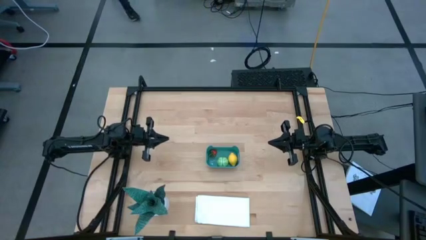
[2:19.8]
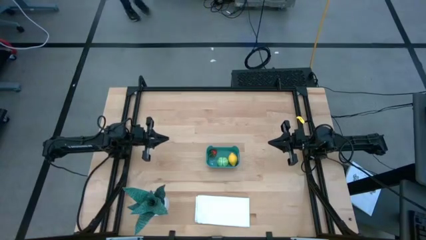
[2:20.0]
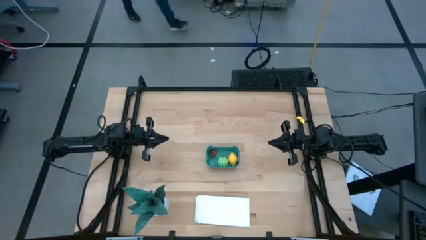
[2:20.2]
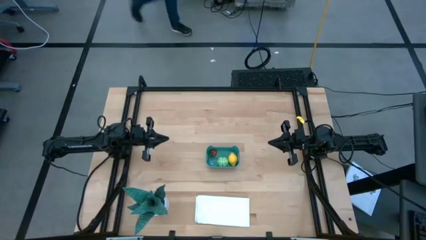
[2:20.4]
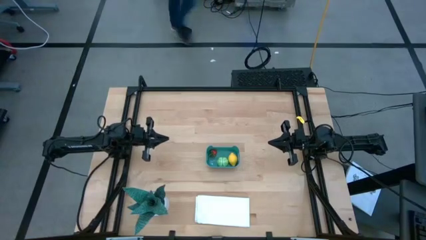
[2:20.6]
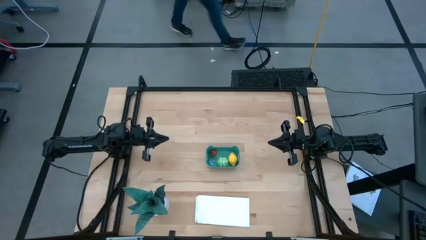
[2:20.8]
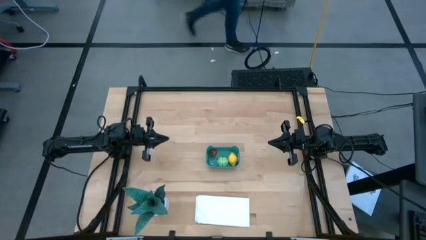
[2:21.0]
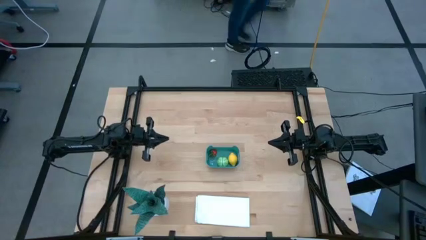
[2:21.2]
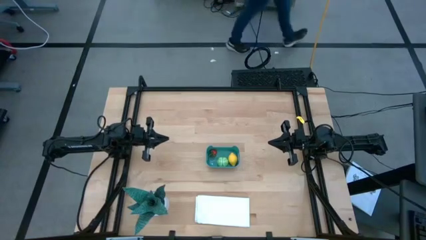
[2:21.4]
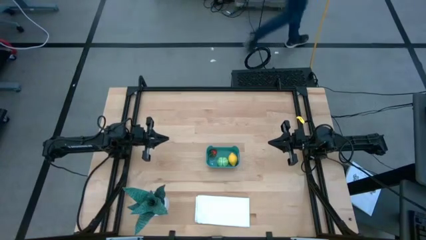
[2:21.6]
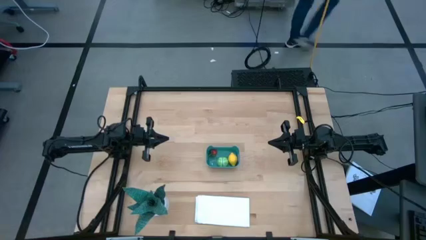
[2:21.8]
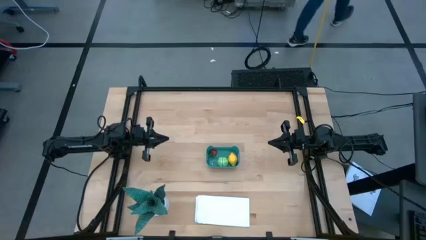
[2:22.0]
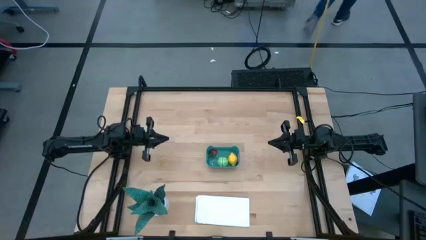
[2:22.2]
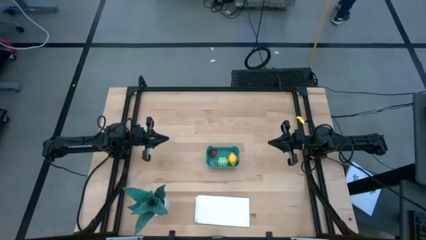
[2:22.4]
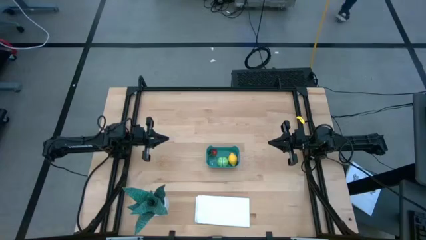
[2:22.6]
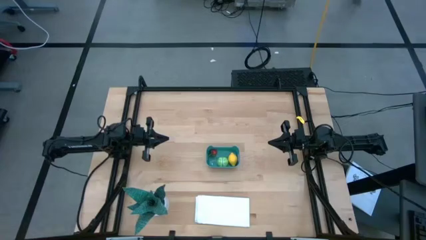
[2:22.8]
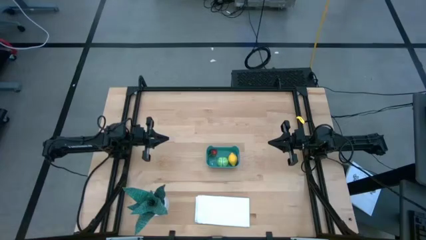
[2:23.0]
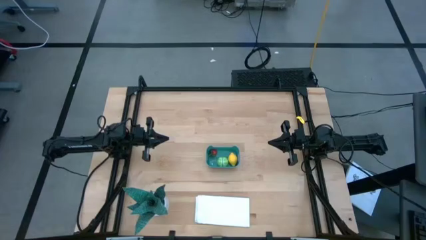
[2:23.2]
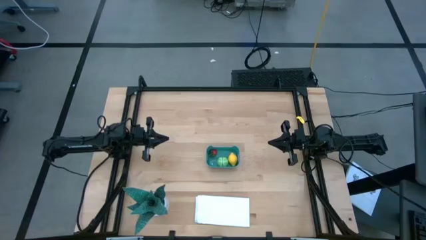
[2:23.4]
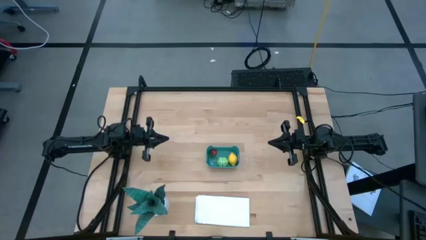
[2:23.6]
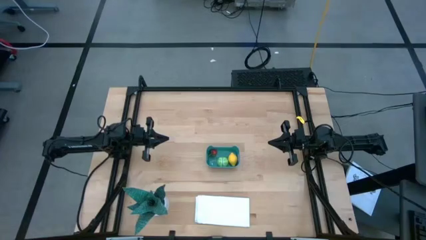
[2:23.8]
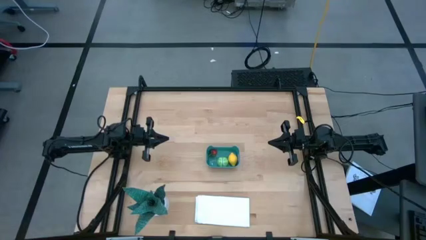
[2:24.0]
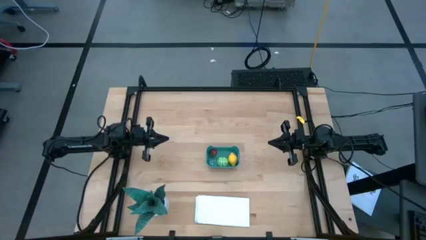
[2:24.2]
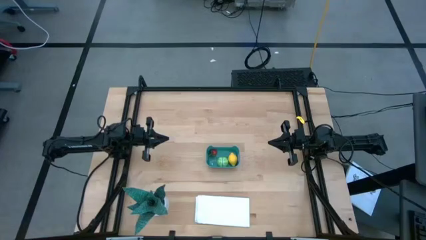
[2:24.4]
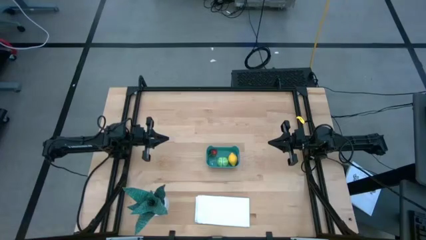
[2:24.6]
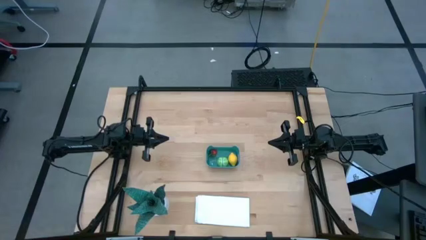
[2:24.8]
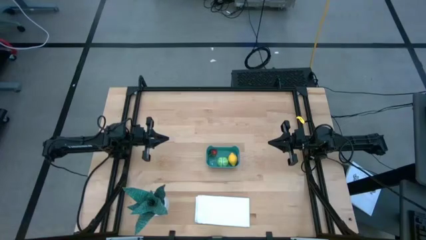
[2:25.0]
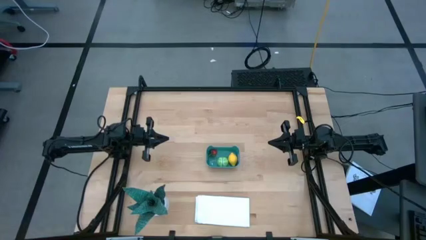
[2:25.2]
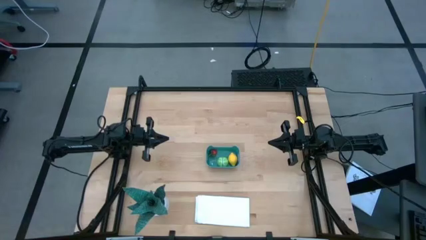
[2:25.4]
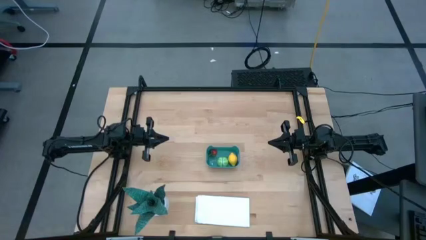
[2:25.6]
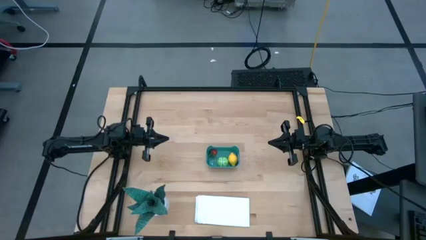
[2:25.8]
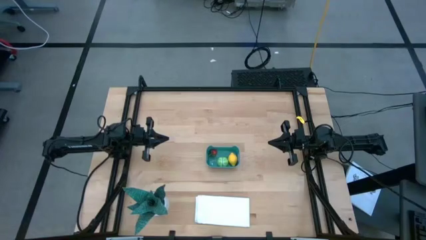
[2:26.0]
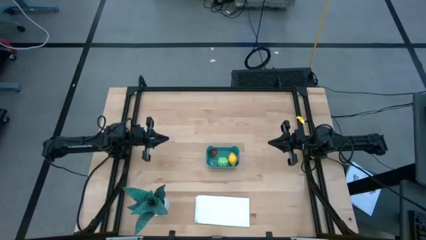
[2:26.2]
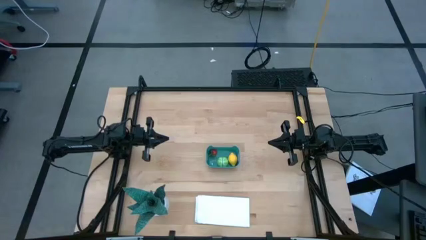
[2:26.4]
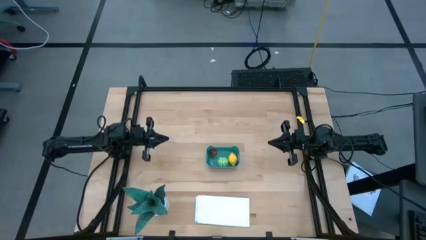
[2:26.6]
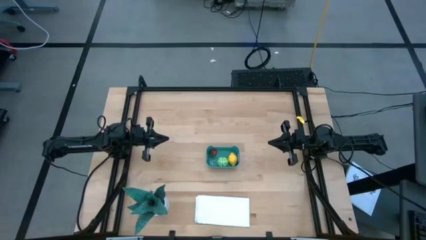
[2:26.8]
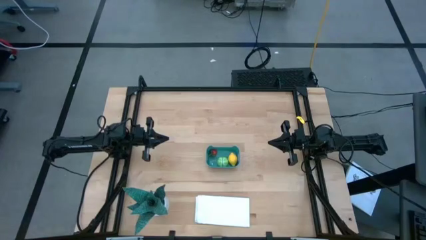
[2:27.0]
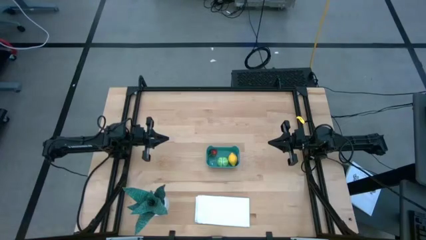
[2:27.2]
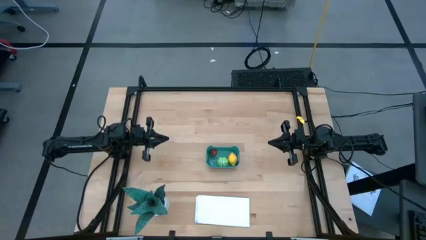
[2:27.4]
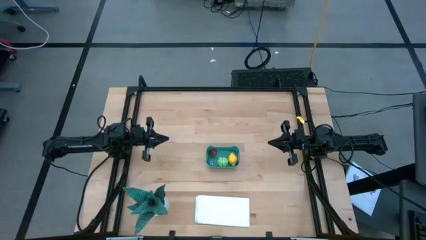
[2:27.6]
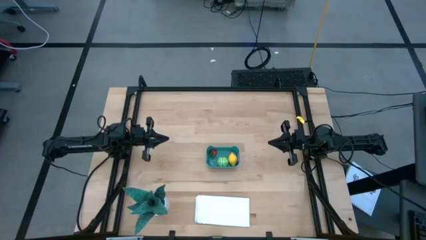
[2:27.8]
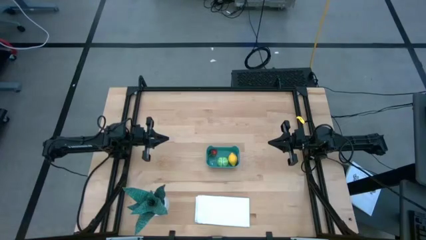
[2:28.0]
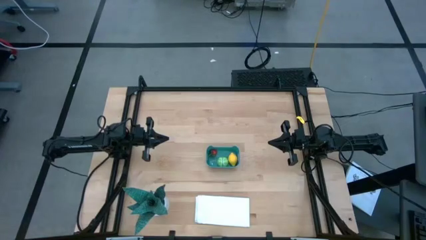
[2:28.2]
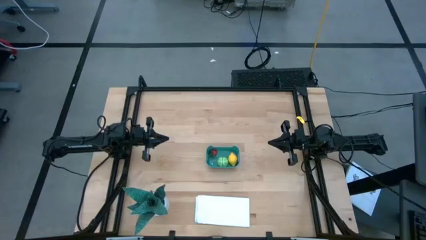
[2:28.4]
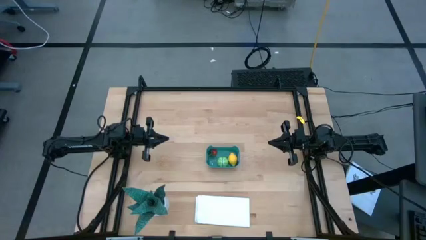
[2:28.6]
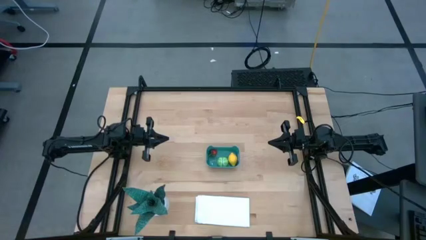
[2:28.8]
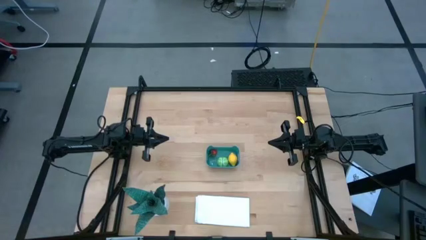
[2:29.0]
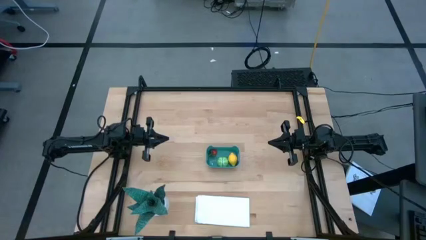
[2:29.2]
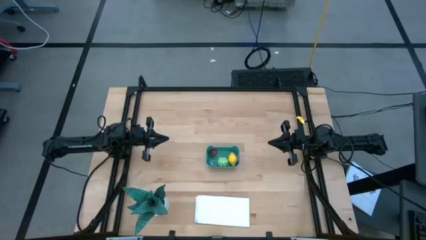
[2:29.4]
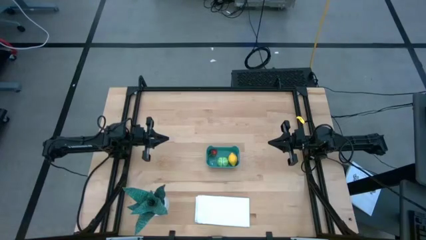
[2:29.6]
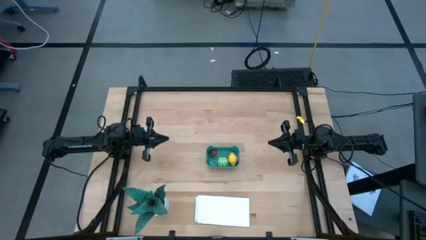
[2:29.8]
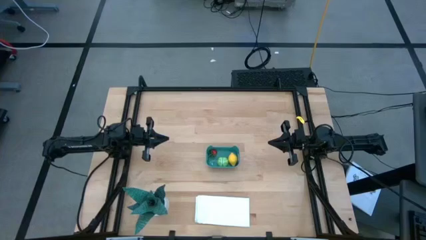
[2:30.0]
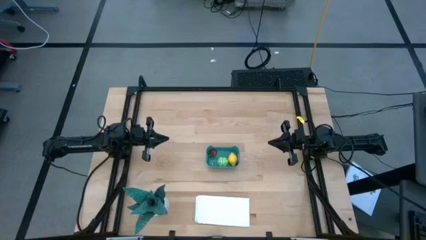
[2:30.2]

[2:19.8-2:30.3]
Task: Pick and placing Produce into tupperware
Return to Home Position

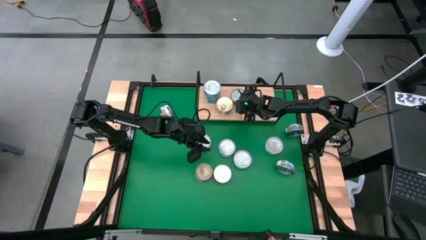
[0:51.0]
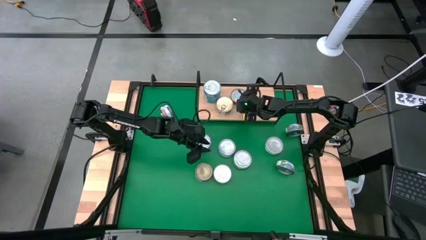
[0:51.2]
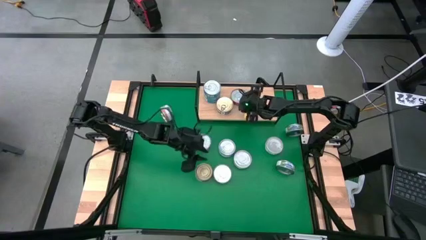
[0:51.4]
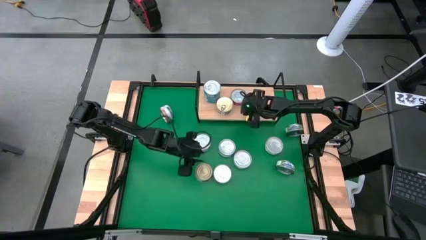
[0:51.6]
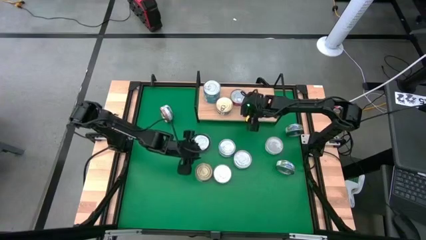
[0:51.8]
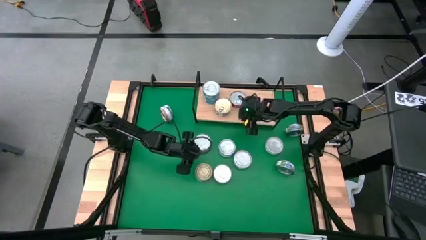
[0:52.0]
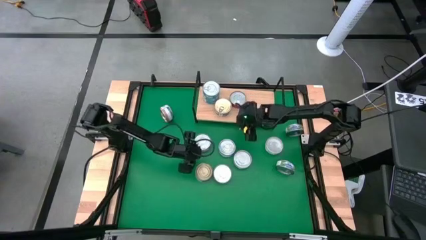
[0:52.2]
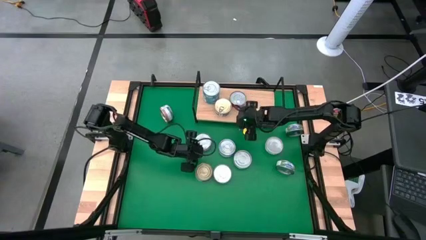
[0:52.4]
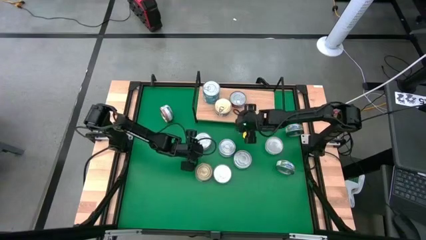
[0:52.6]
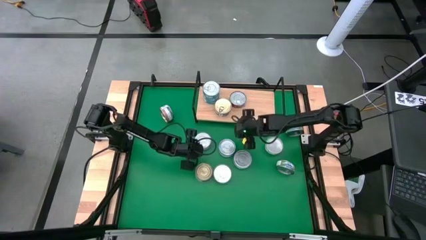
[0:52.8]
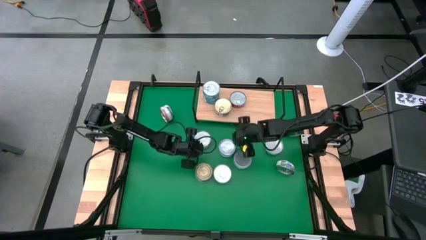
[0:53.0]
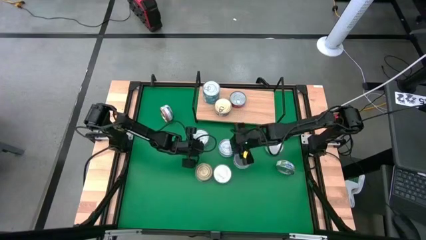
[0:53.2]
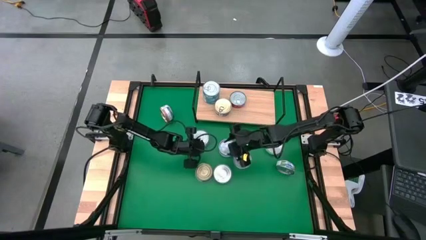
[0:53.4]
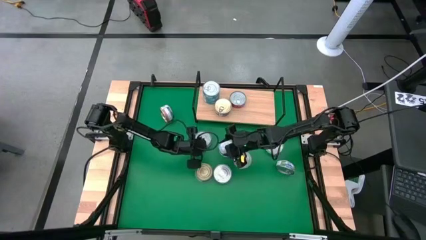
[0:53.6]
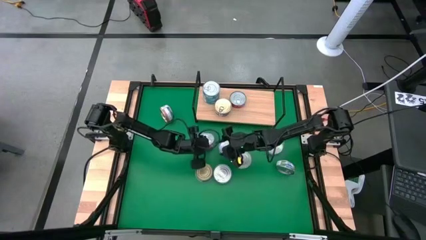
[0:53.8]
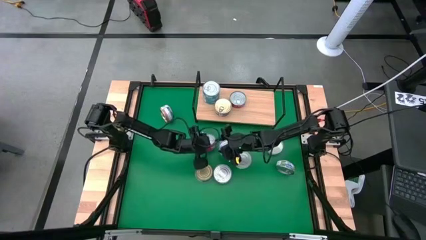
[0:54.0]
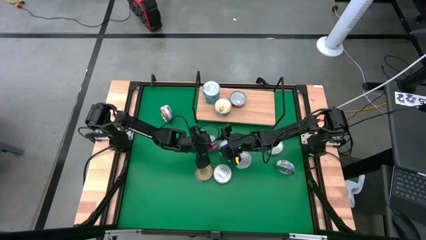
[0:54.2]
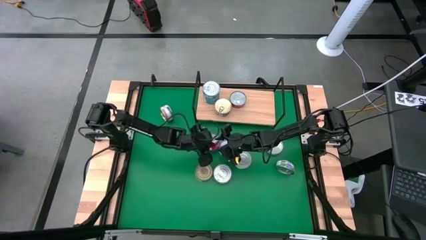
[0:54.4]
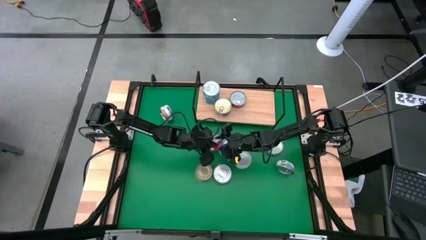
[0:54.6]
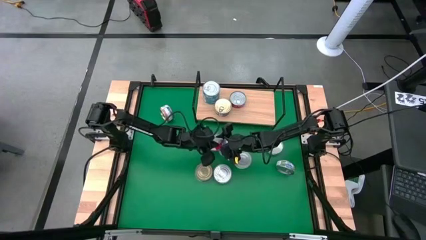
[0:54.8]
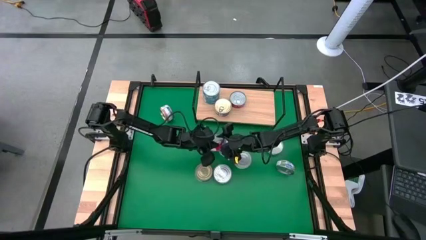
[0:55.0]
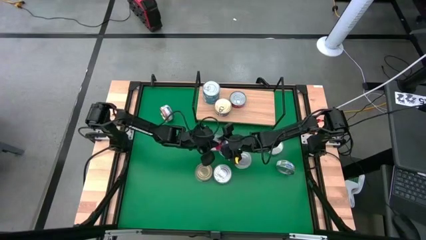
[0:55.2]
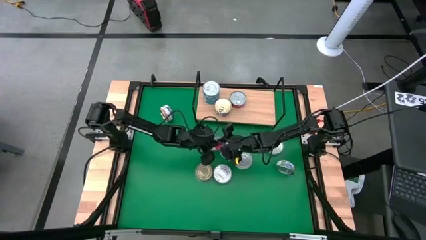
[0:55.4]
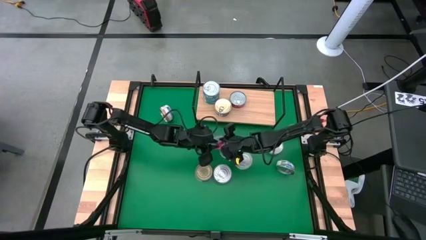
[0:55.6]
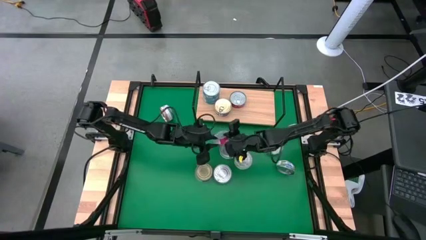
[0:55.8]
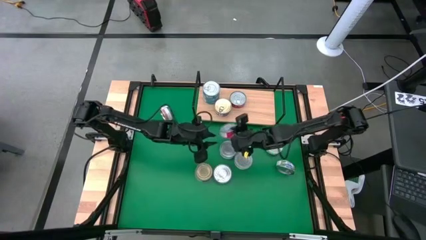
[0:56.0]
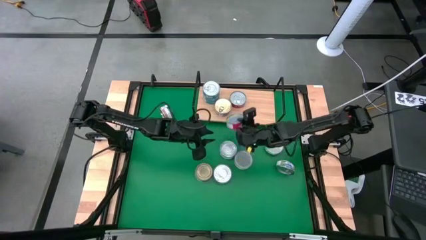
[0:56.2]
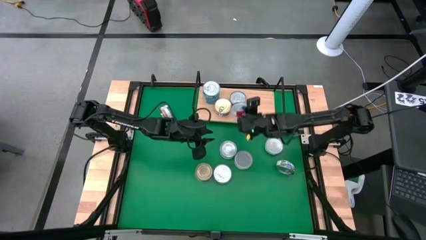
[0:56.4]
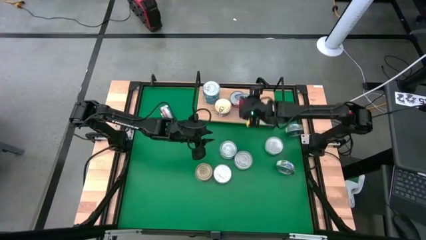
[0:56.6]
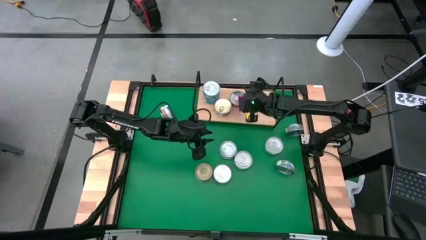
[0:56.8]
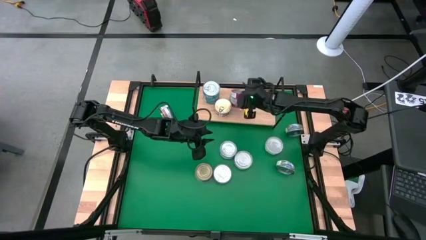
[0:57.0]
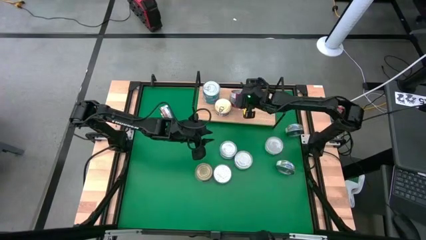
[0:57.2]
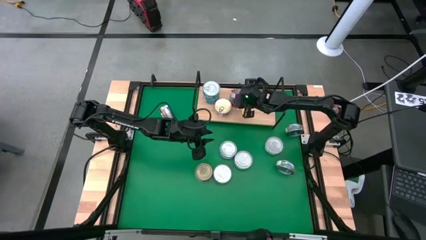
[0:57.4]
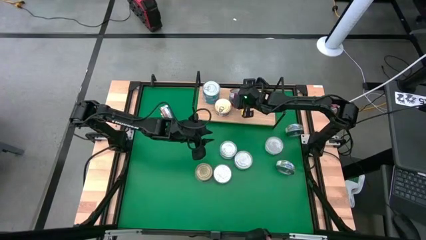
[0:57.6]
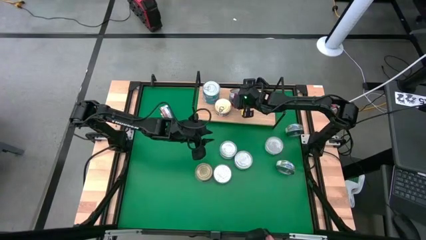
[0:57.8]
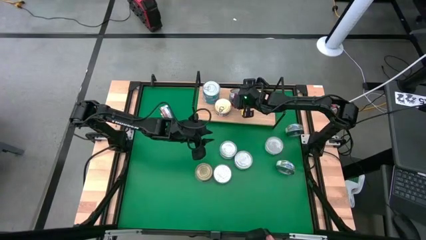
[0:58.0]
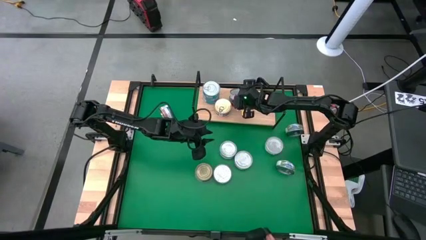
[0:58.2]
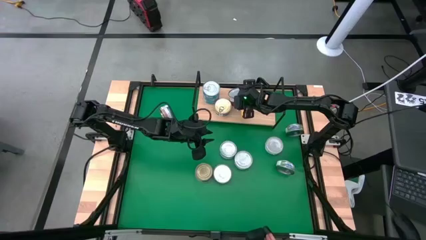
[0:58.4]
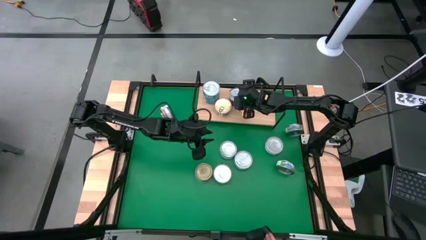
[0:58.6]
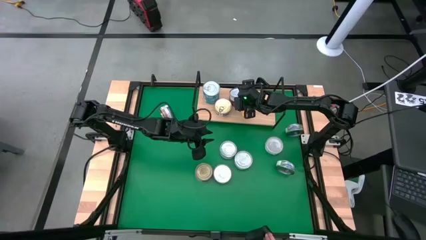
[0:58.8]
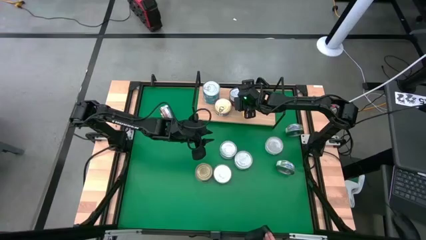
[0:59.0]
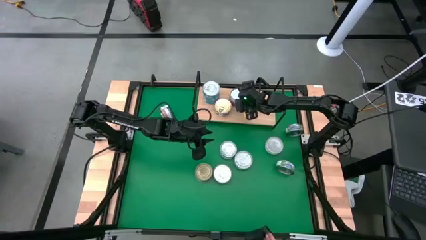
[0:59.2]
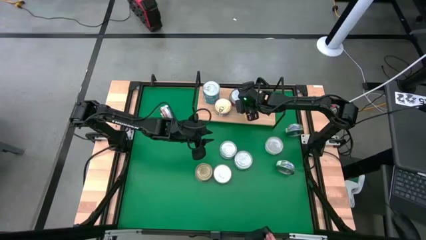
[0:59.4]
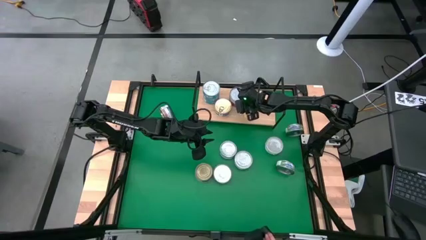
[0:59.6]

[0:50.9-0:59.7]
Task: Stack canned seafood by type on shelf
Stack the red tuna can on top of the red tuna can on the shelf
